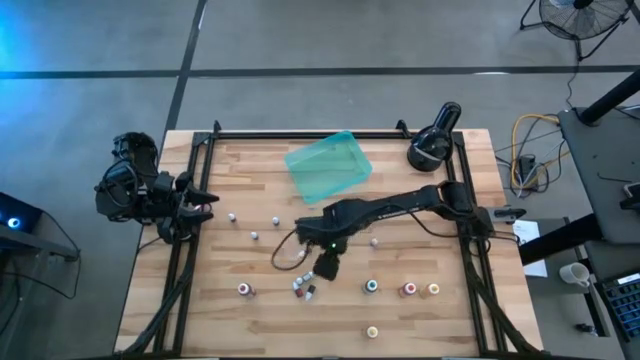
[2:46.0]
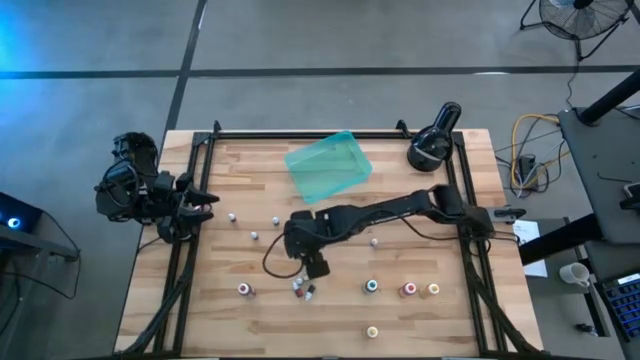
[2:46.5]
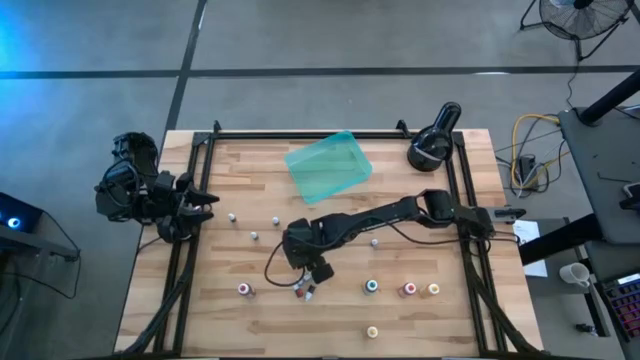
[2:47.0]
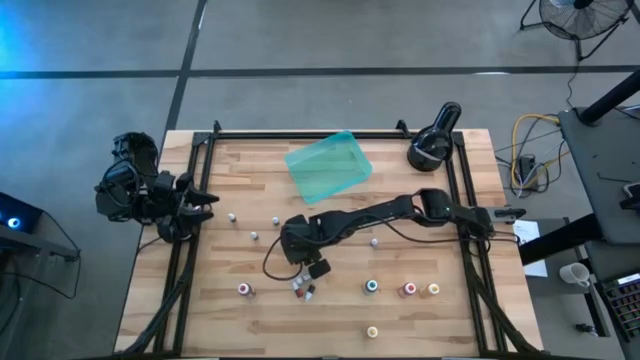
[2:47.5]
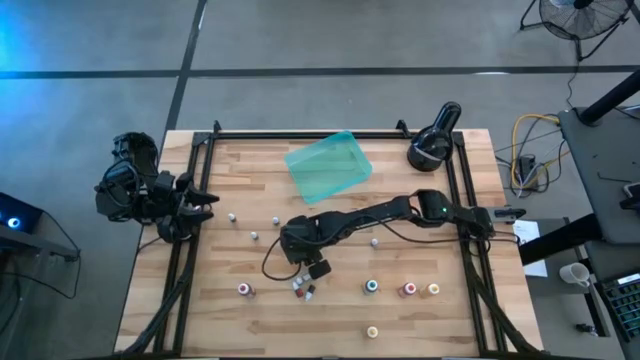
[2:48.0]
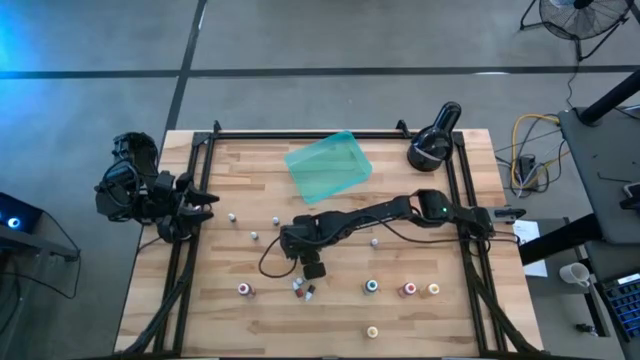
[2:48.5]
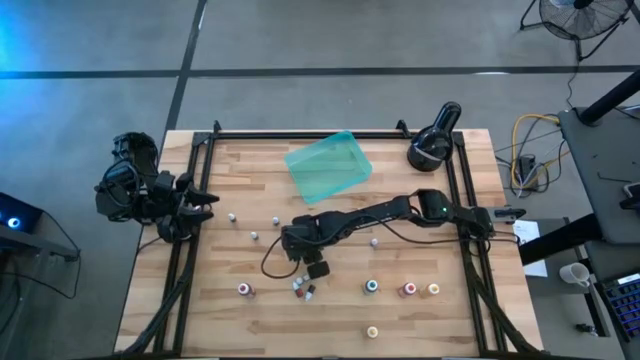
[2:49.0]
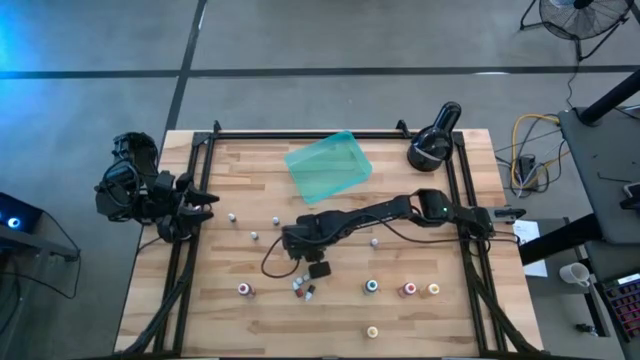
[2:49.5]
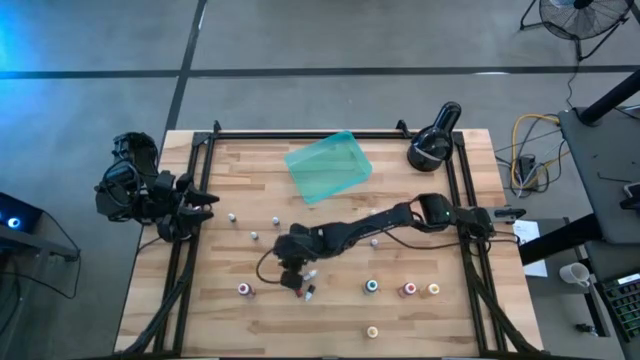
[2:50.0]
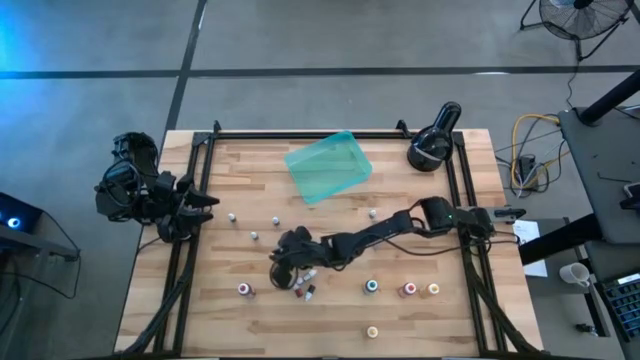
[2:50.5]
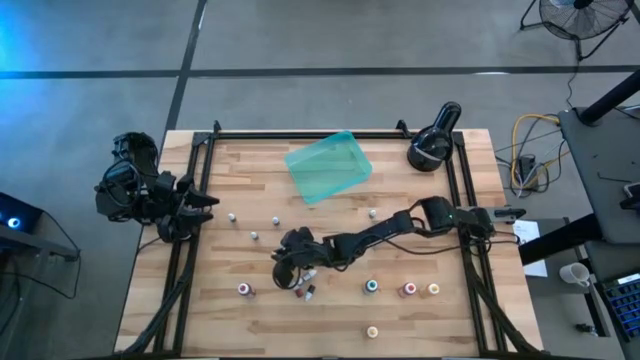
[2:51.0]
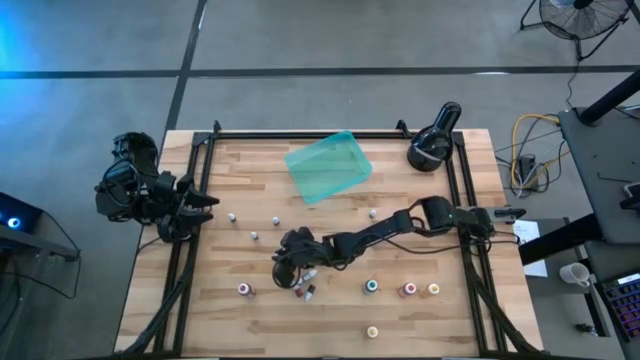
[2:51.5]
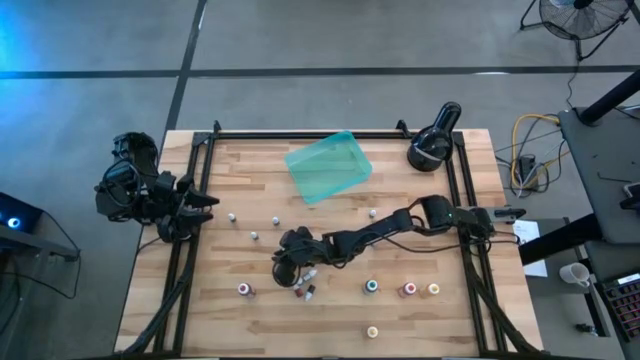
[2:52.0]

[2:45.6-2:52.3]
Task: Pick & Place food coloring
Adjust the green big food coloring bottle

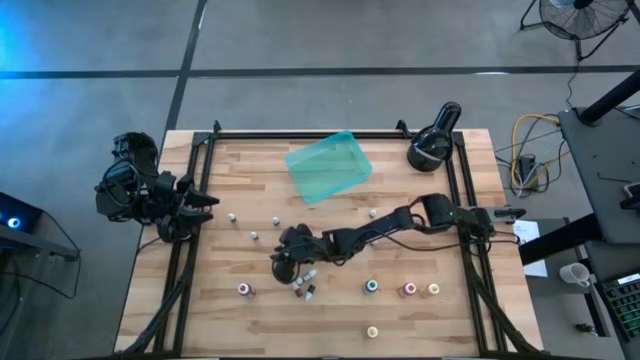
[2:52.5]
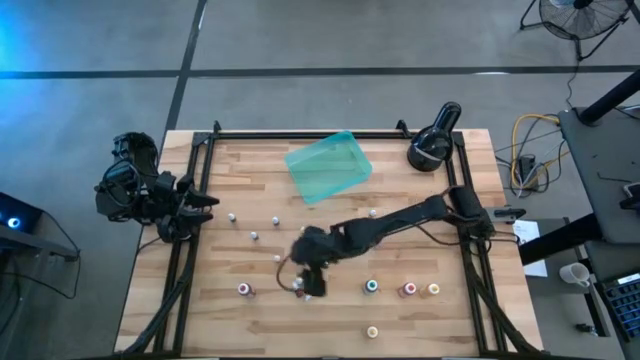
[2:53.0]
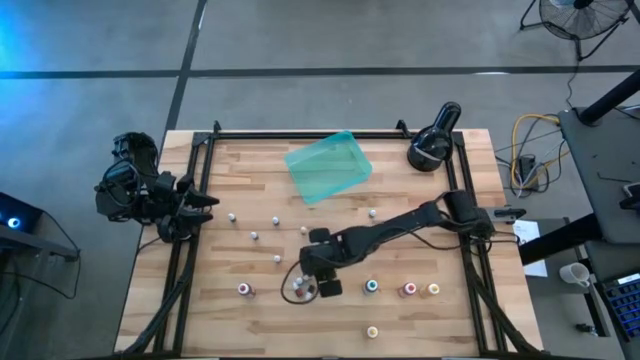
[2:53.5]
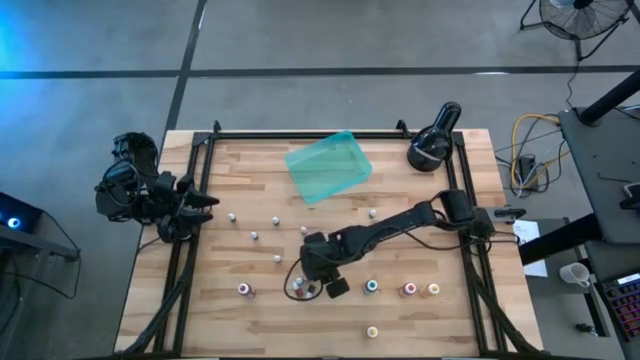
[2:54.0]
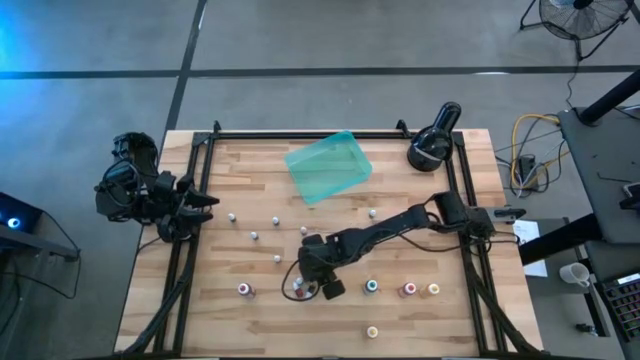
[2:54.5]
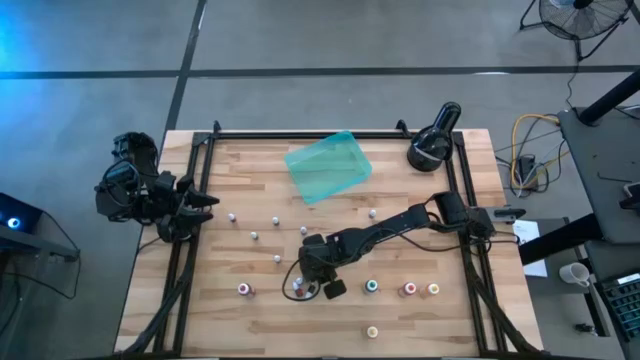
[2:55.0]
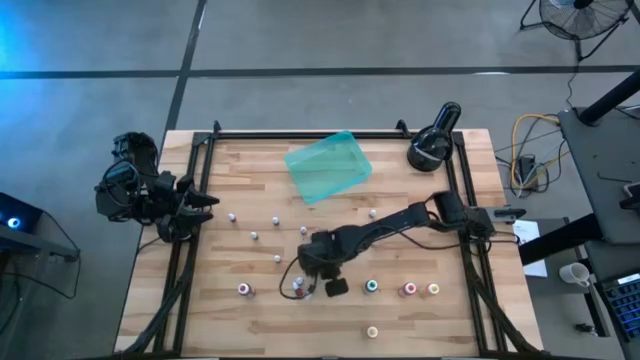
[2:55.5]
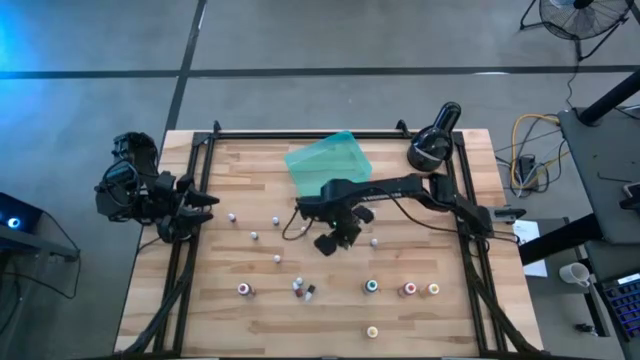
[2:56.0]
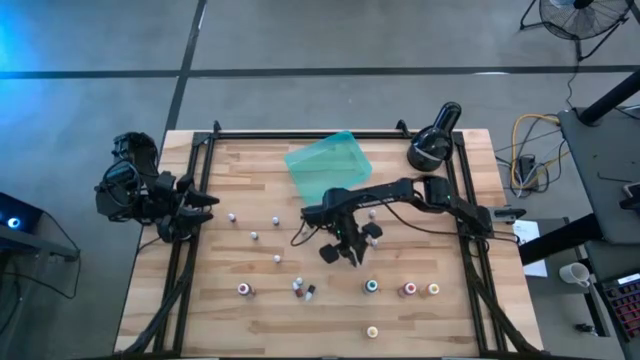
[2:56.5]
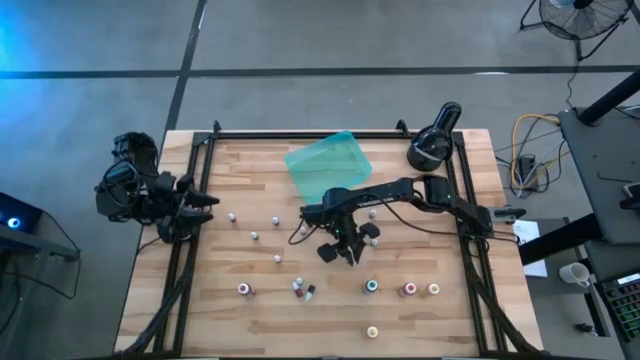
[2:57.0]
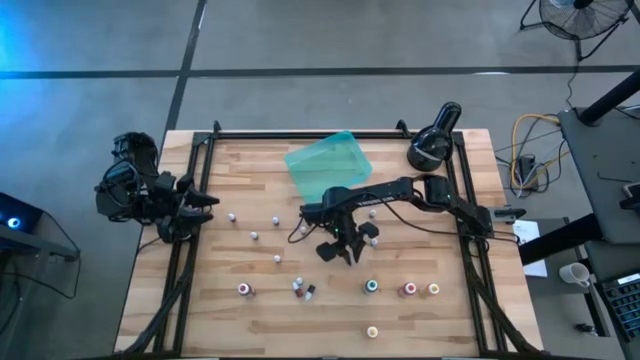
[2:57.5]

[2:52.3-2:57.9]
Adjust the orange small food coloring bottle

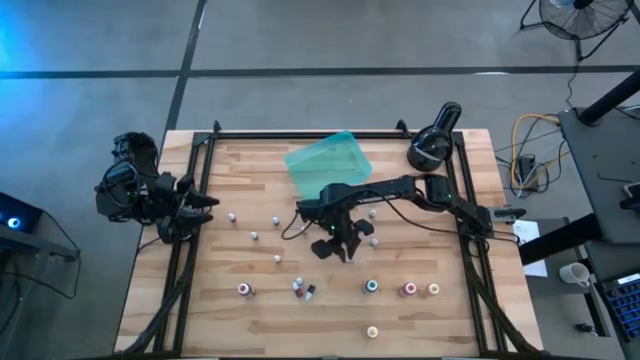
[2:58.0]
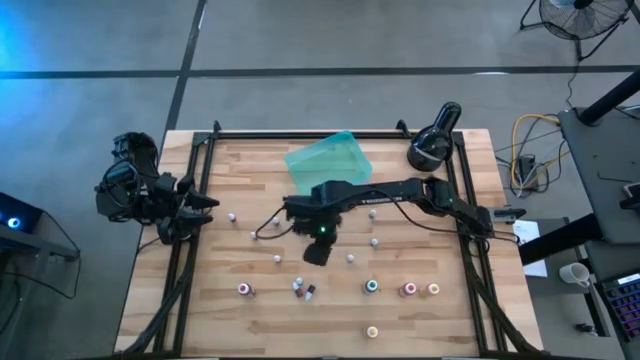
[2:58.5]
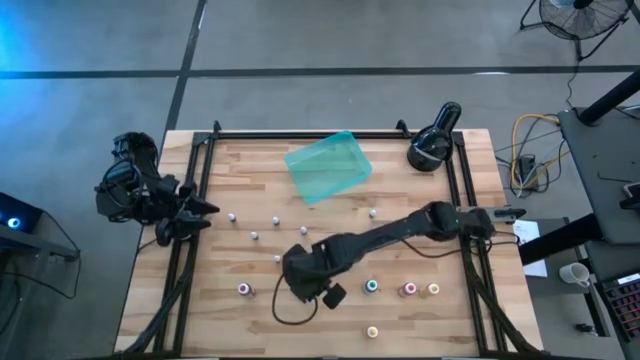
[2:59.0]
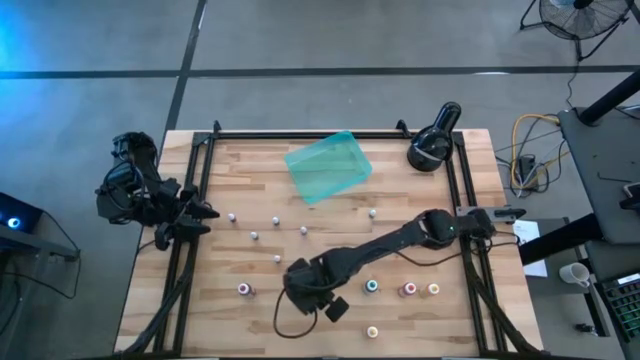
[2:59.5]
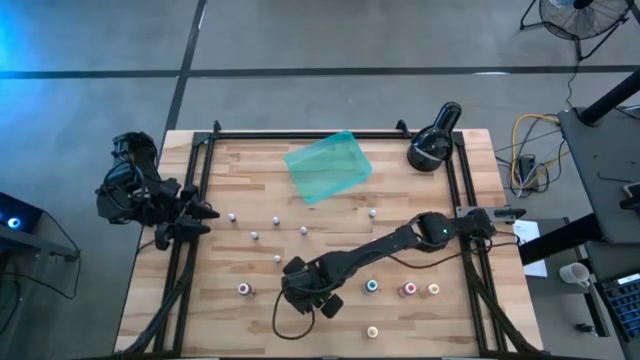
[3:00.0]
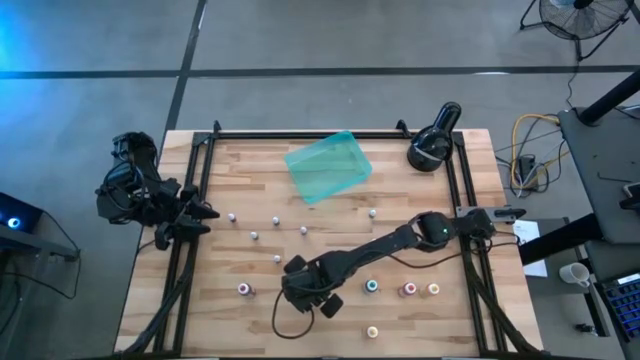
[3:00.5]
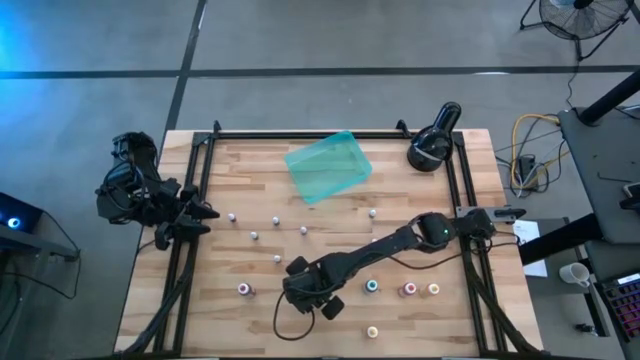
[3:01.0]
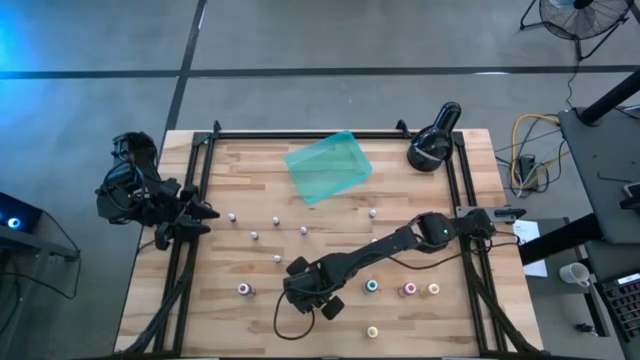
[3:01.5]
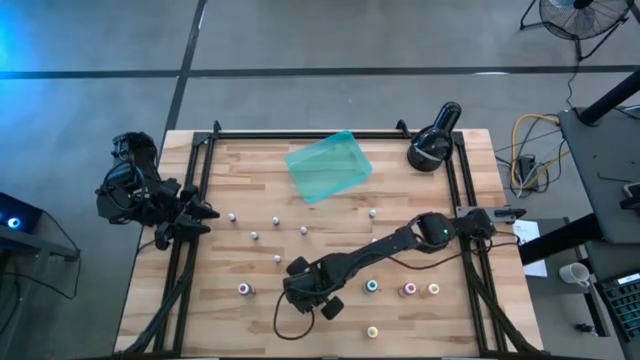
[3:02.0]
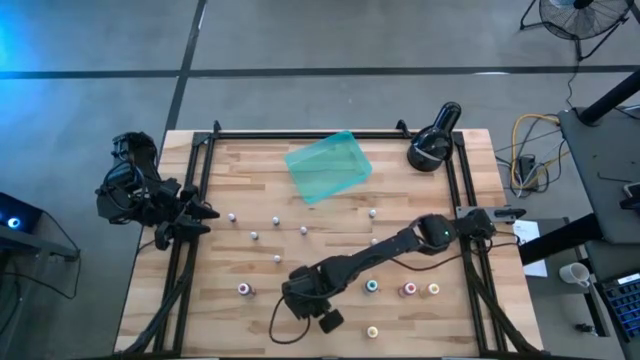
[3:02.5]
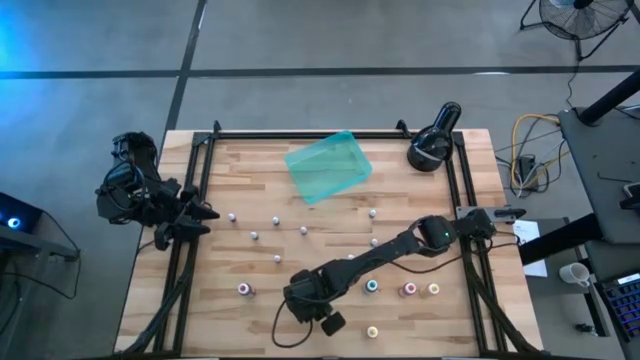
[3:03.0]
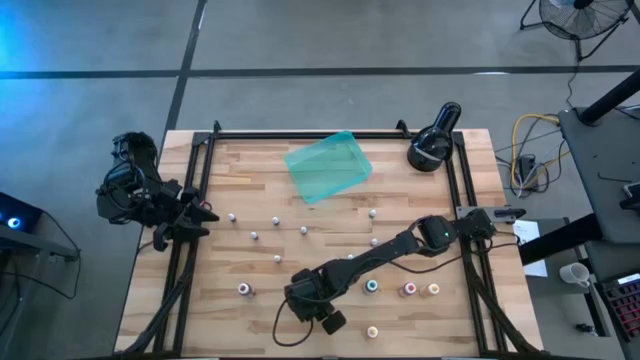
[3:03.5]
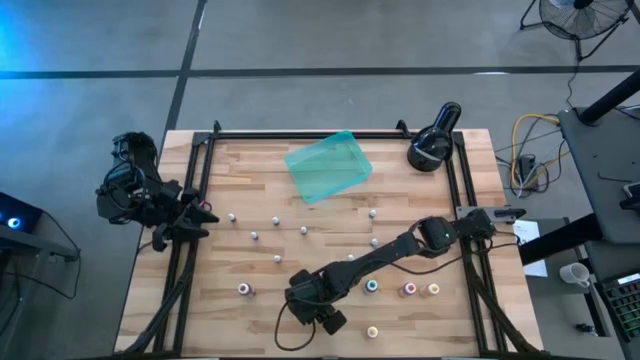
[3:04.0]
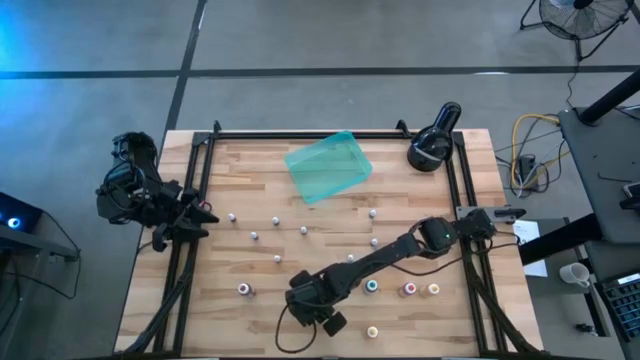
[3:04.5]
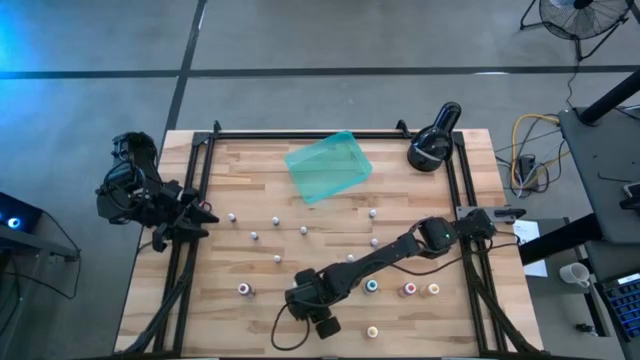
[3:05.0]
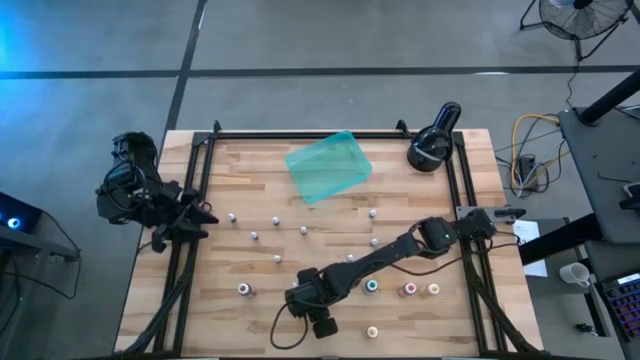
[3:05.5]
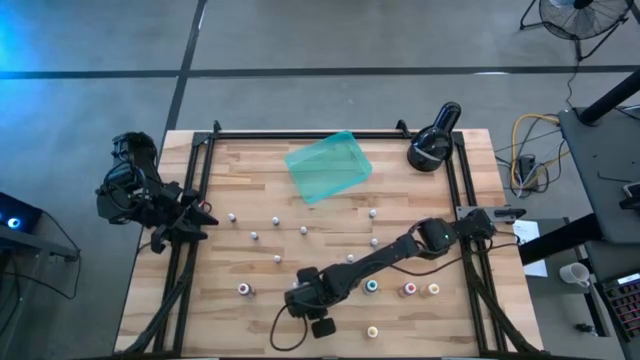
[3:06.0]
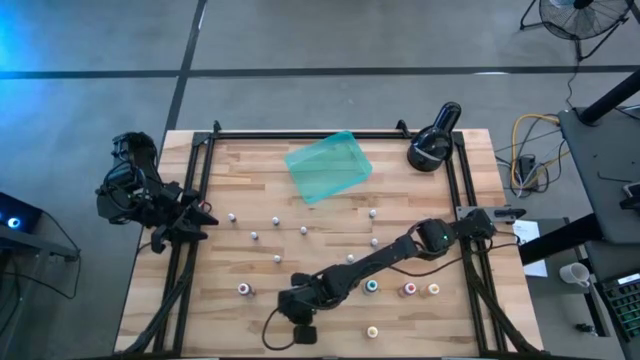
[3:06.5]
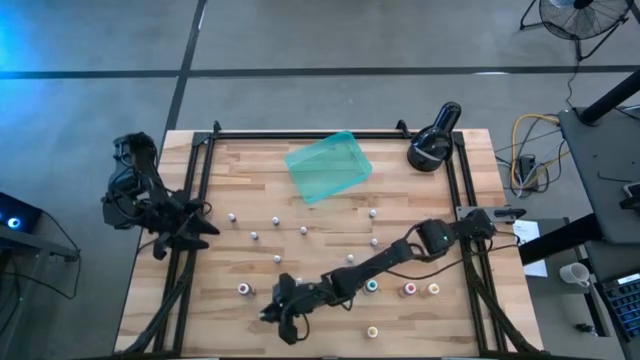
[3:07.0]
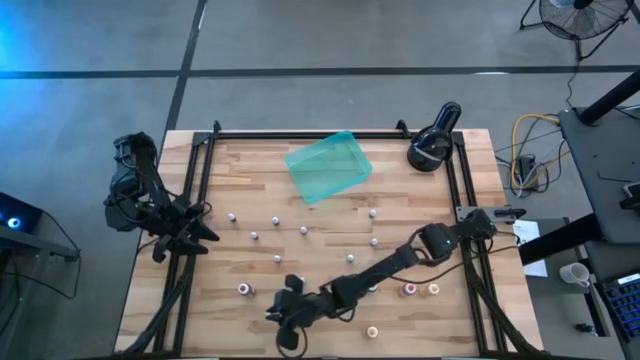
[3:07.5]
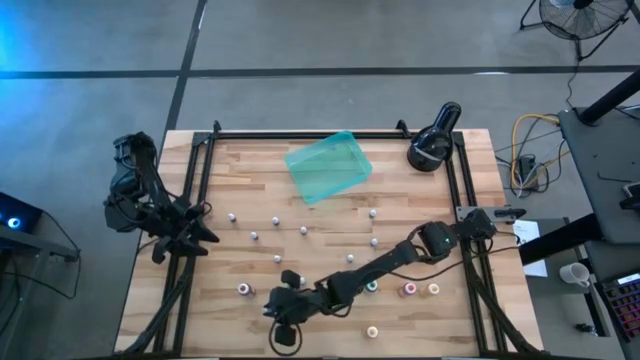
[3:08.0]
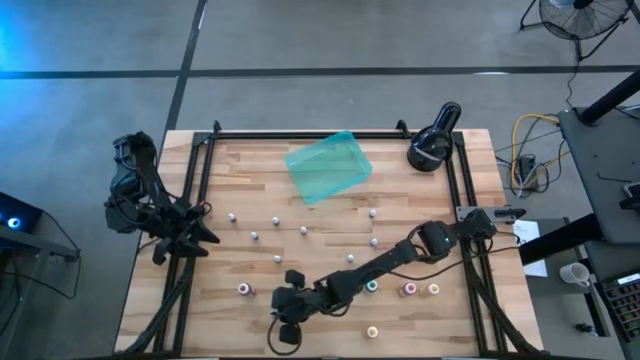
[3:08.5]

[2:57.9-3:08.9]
Adjust the green small food coloring bottle
